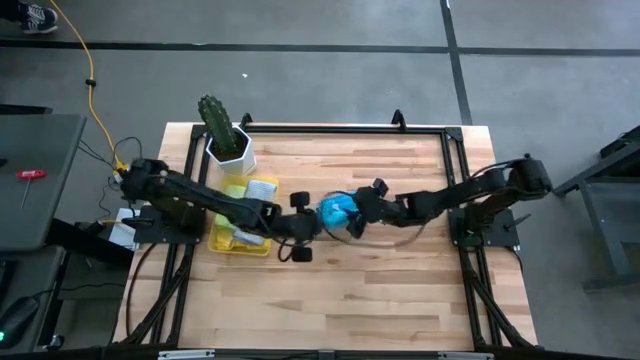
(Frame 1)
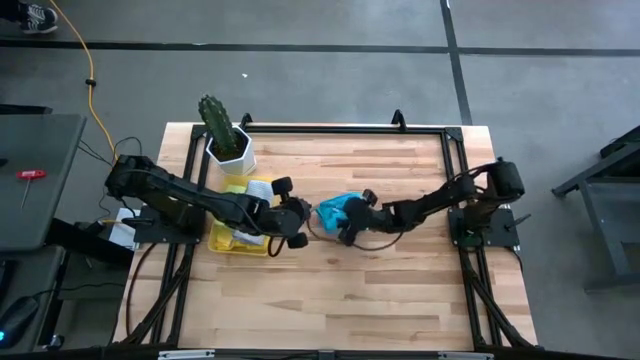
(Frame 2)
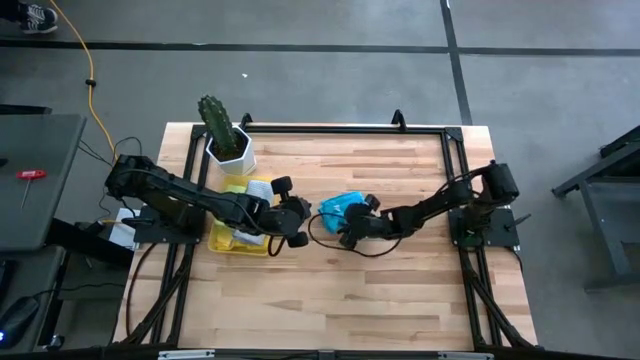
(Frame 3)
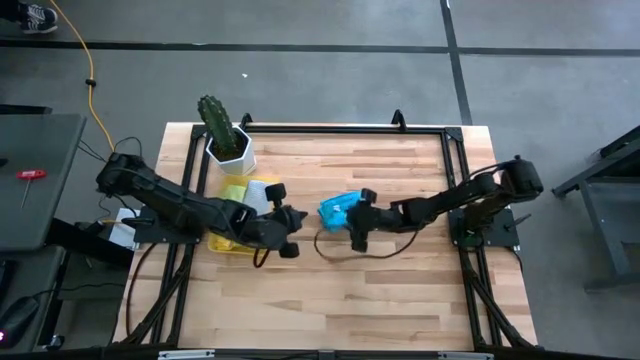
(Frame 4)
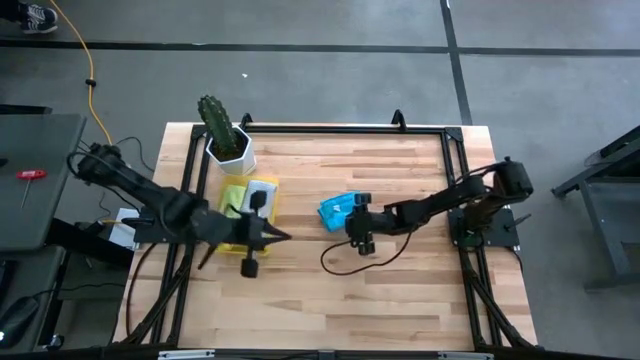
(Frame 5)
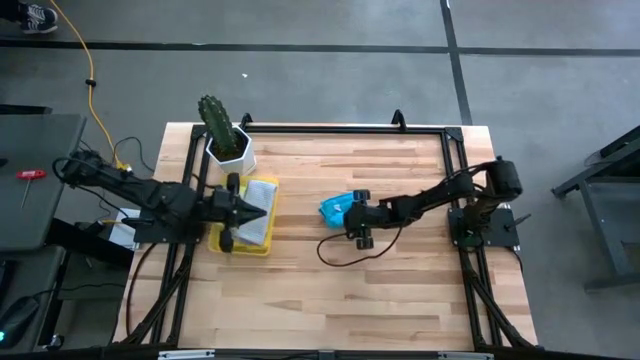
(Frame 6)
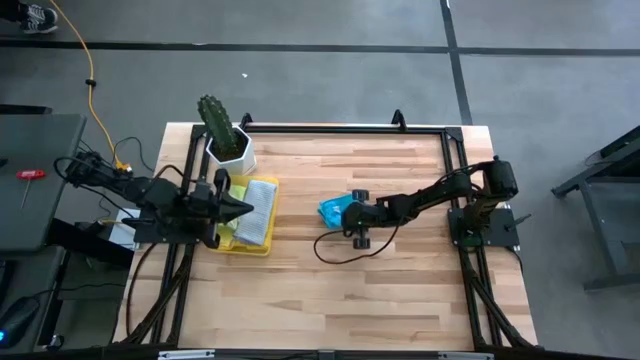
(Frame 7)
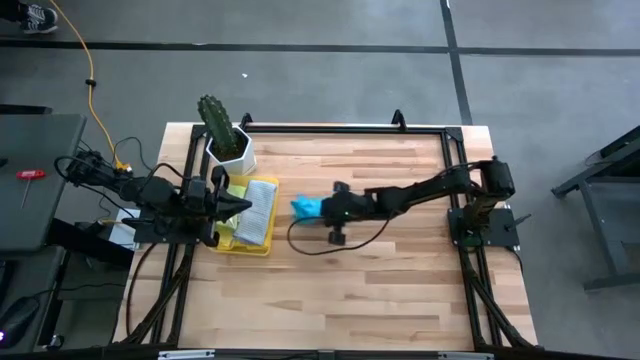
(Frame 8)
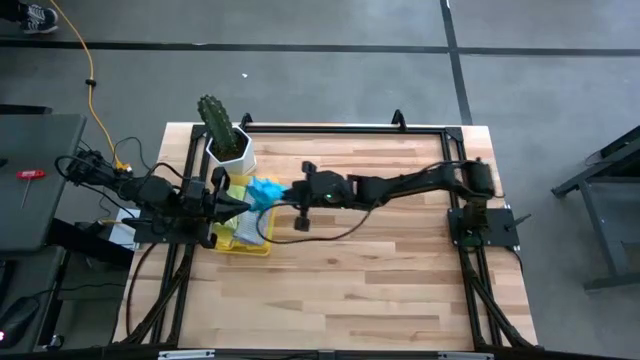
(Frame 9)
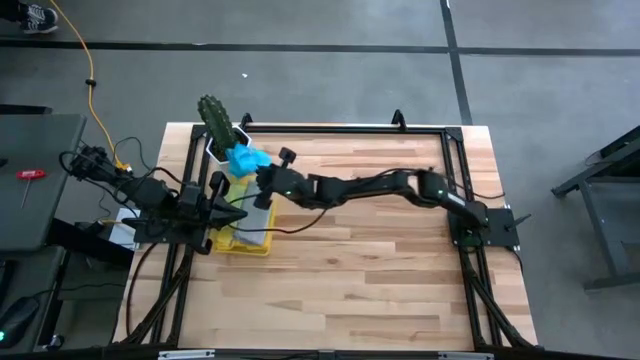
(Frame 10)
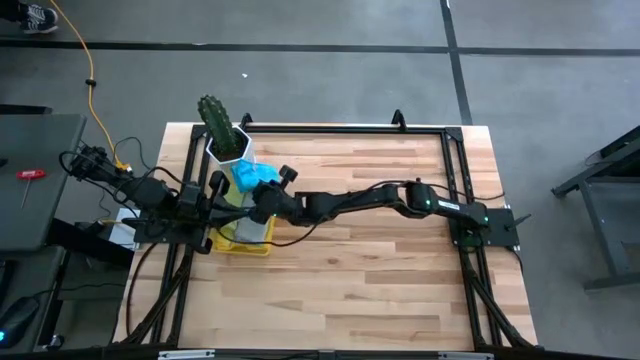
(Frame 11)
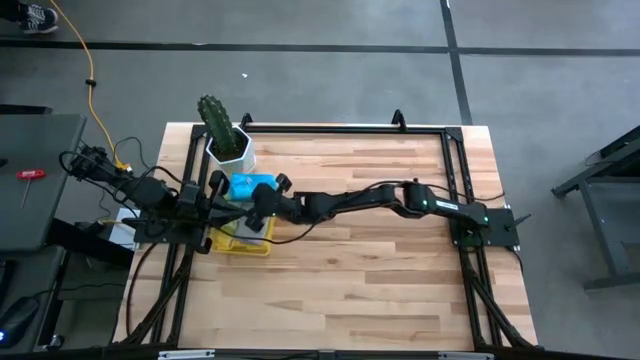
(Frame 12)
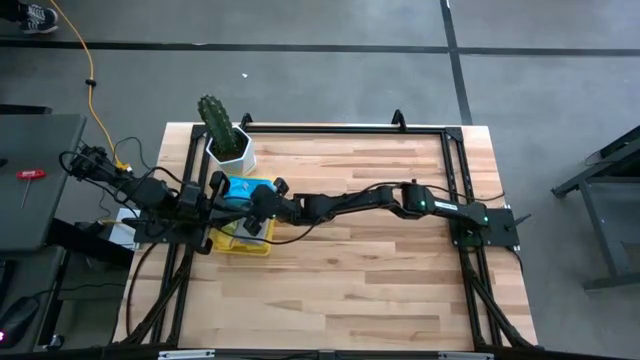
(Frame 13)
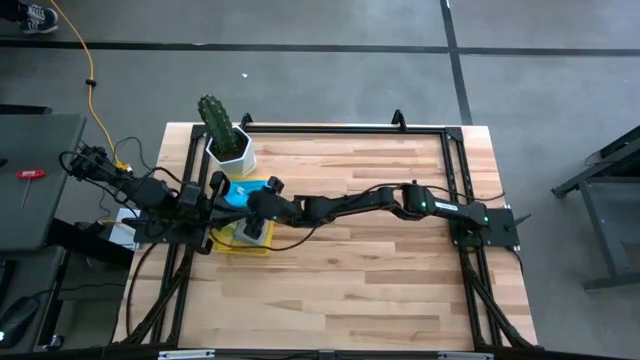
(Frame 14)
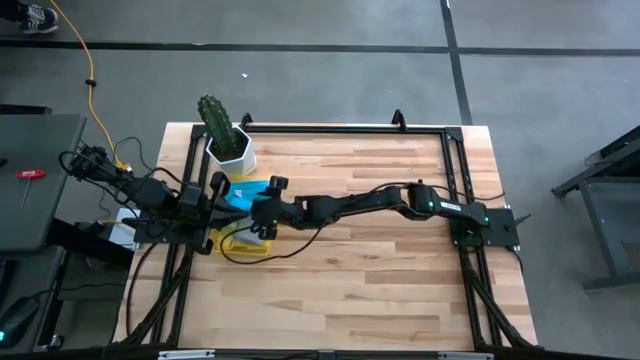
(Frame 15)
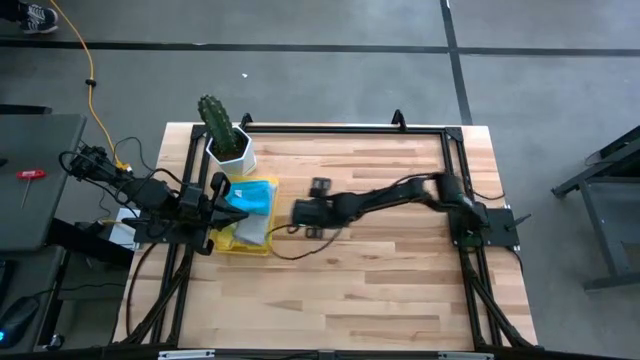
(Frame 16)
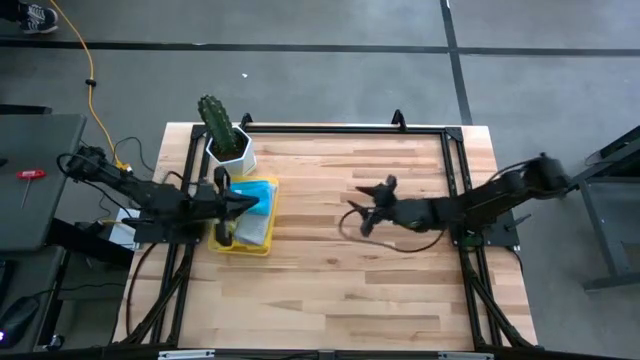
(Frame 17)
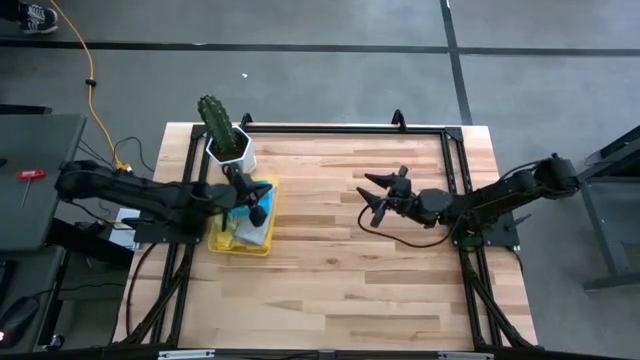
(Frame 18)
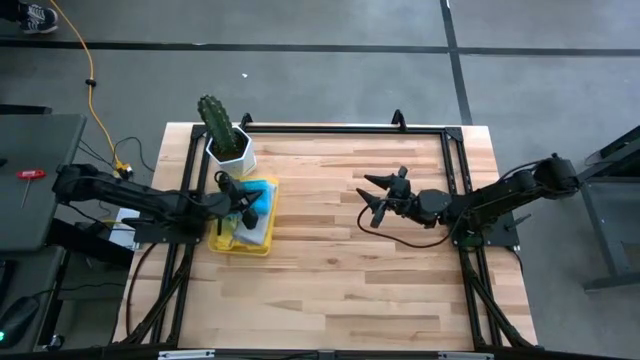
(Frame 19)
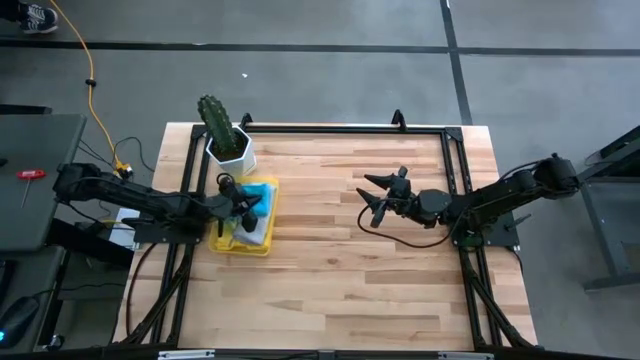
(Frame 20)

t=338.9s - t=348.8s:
Task: Fold microfiber towels
Put the folded blue microfiber towel into the yellow bin

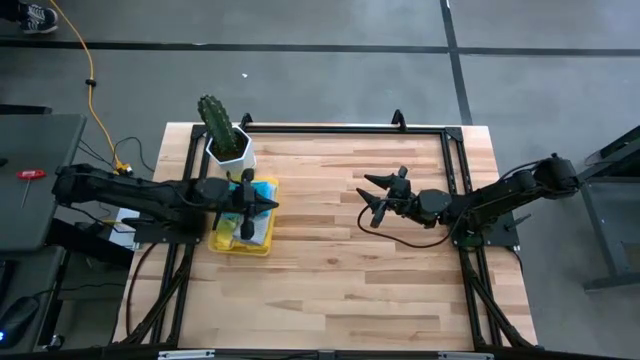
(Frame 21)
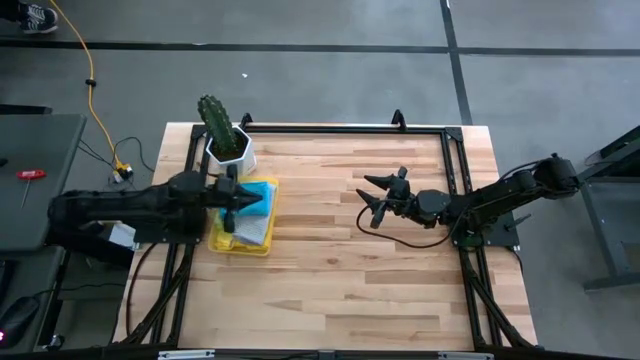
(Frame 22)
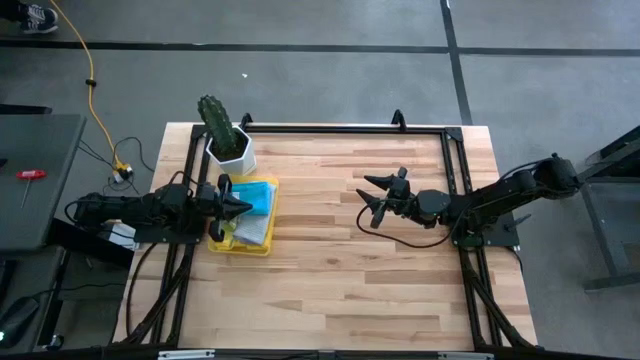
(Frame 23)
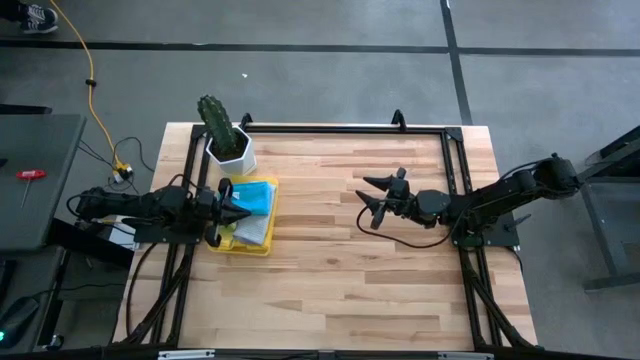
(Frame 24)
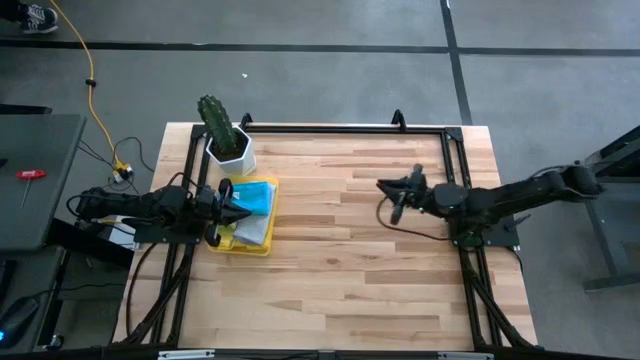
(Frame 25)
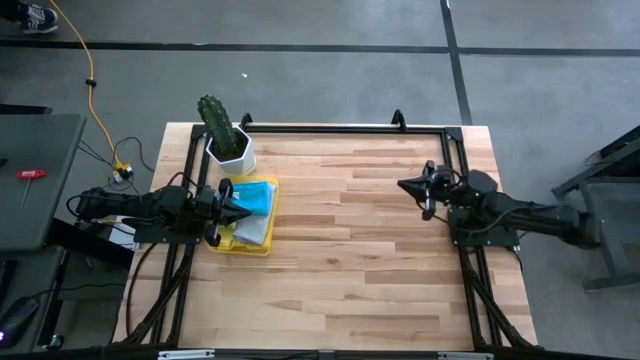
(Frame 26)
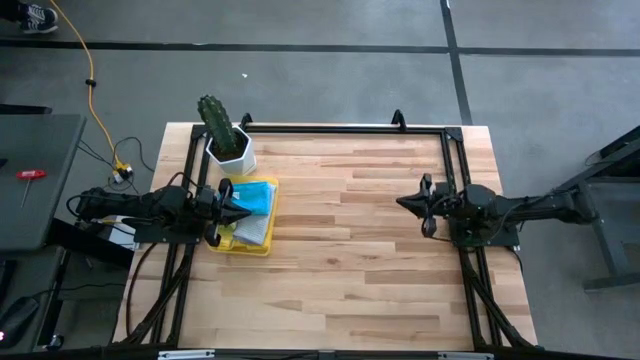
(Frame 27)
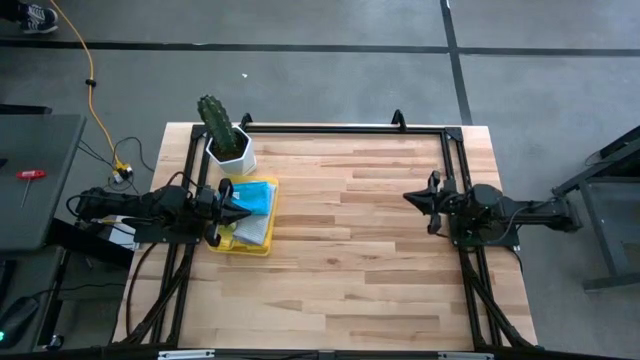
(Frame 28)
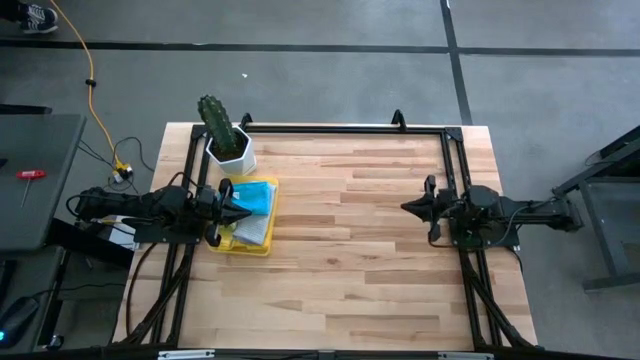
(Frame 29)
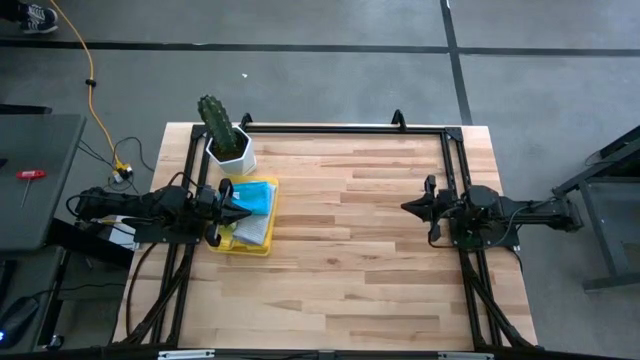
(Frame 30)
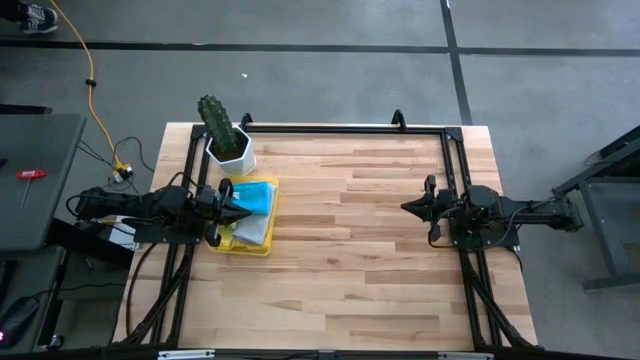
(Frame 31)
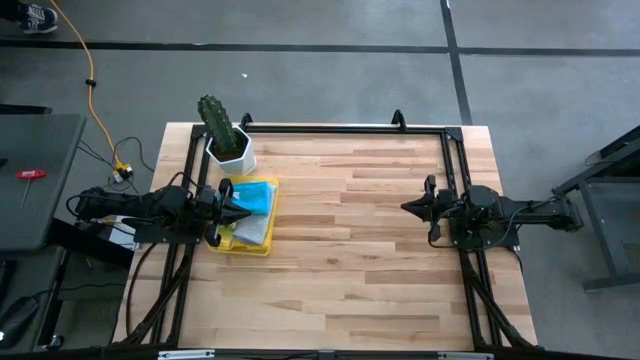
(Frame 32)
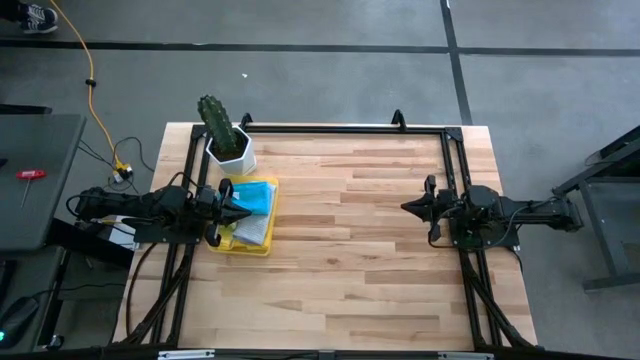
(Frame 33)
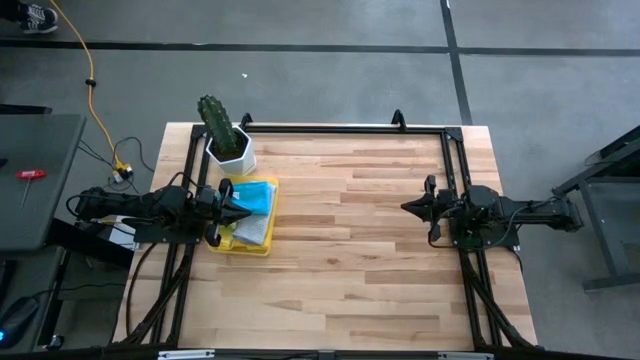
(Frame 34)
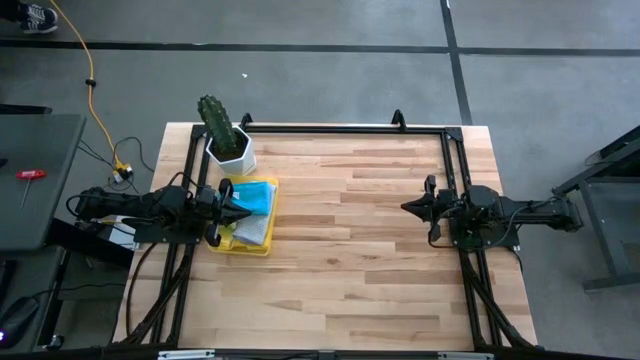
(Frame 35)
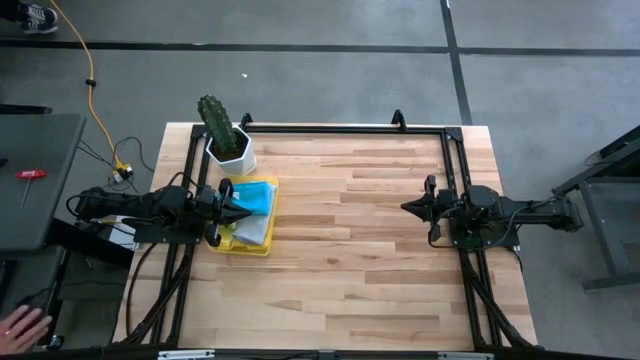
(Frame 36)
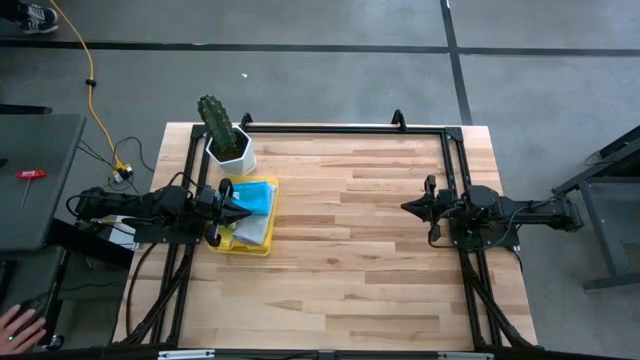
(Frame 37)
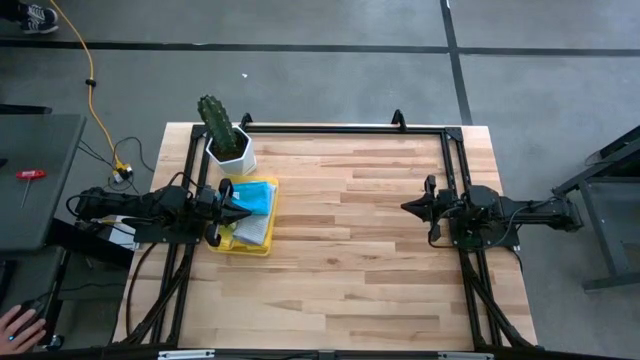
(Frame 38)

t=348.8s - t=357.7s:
Return to Home Position

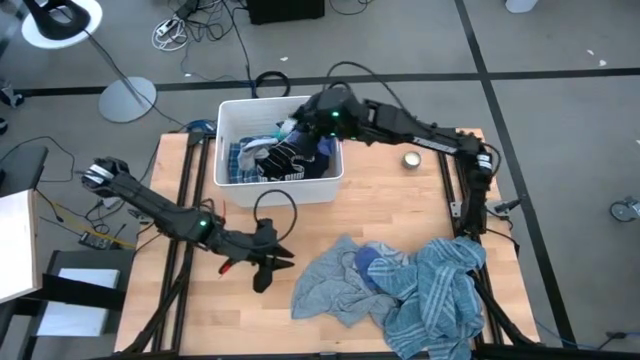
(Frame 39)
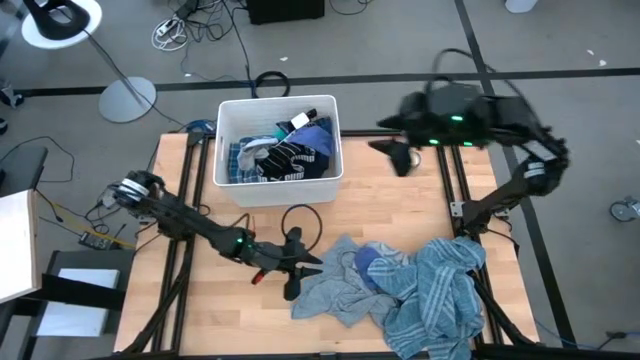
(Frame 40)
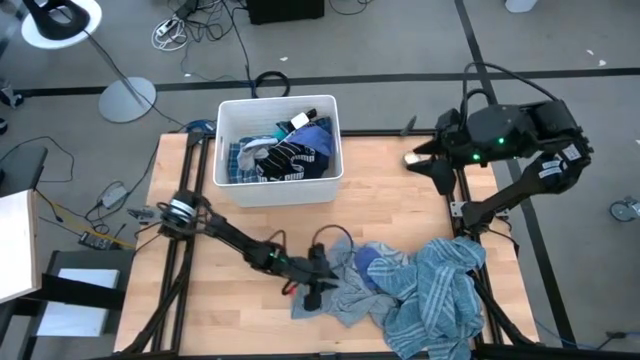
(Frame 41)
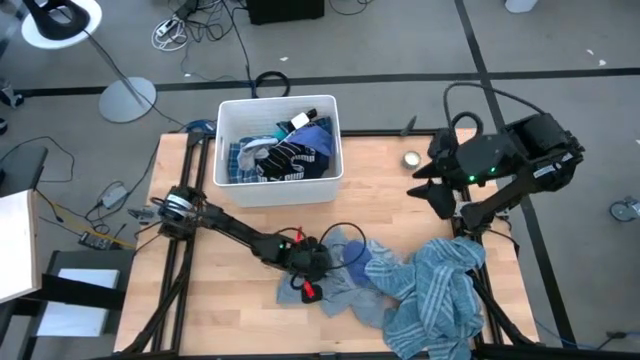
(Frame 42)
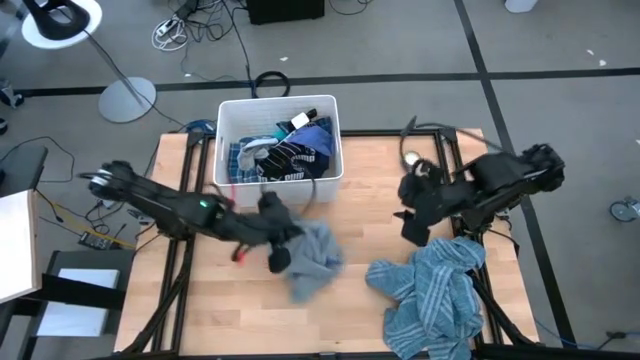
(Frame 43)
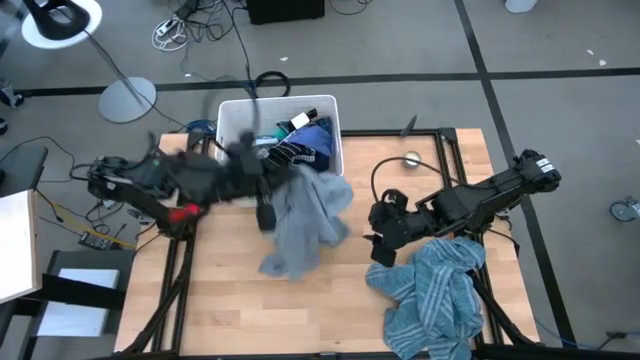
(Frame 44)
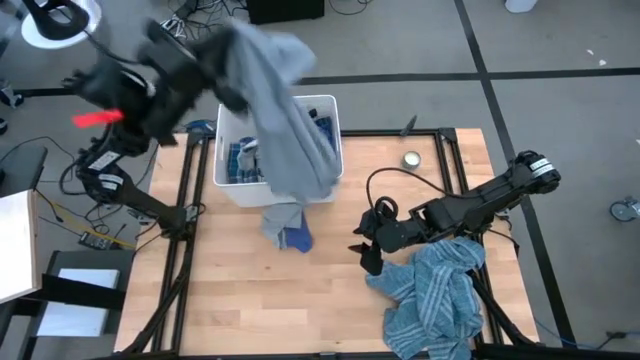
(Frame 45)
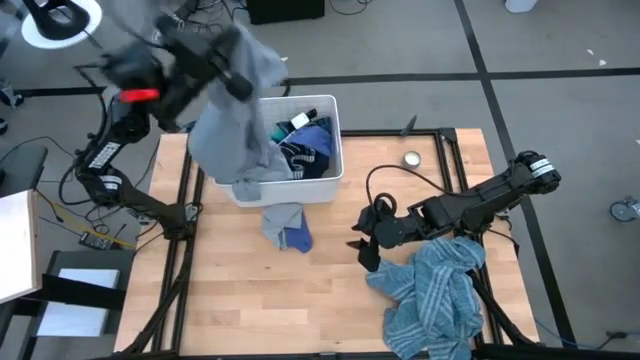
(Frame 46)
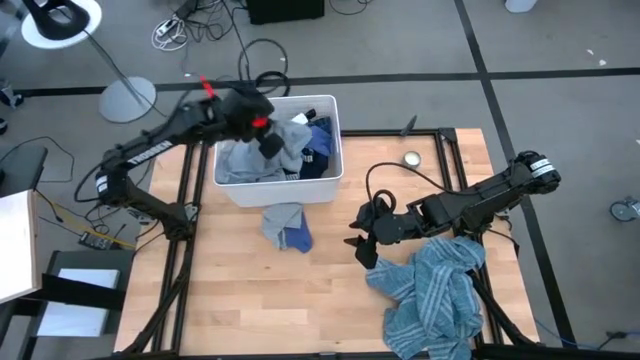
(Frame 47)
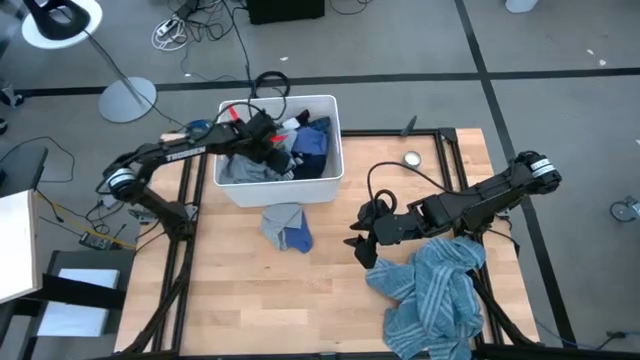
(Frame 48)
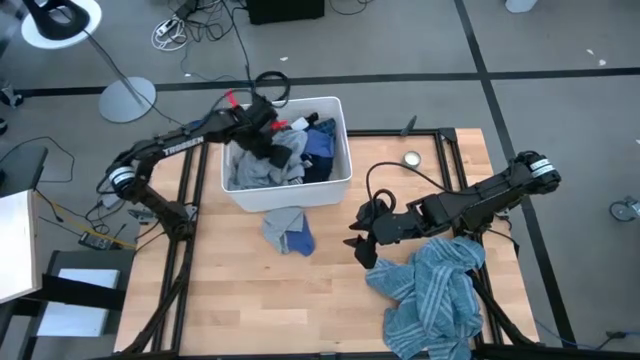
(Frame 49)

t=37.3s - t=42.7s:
Task: Sort clothes
Put the gray shirt into the white laundry bin
